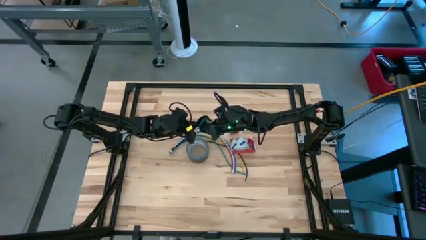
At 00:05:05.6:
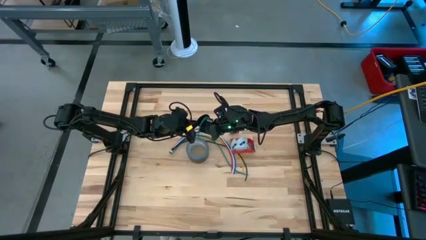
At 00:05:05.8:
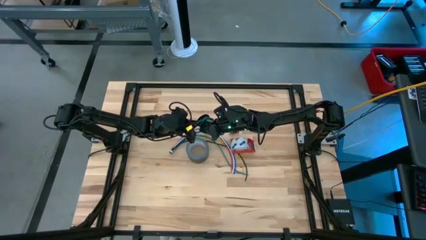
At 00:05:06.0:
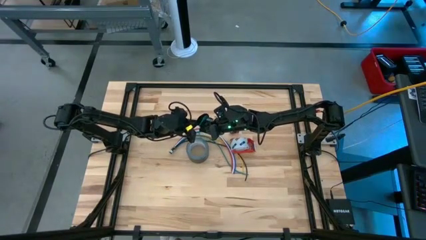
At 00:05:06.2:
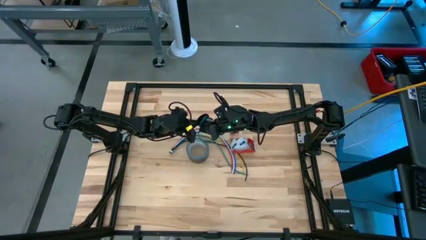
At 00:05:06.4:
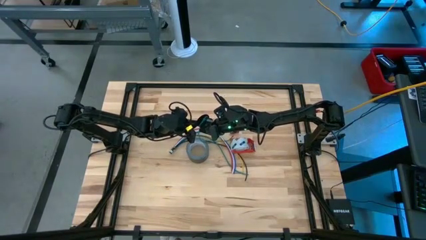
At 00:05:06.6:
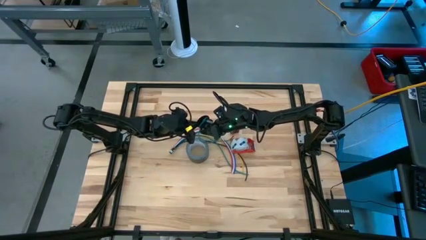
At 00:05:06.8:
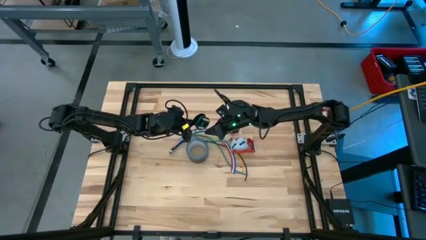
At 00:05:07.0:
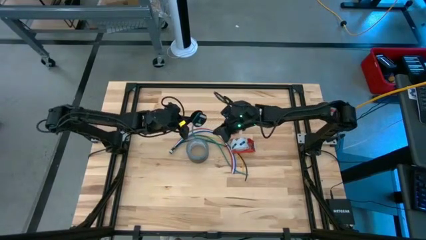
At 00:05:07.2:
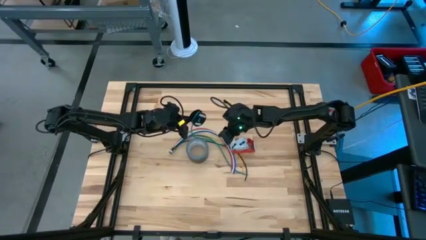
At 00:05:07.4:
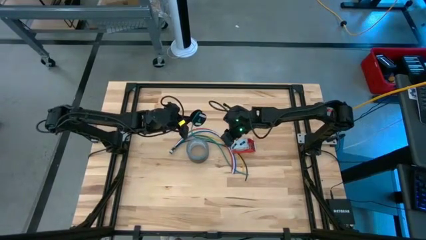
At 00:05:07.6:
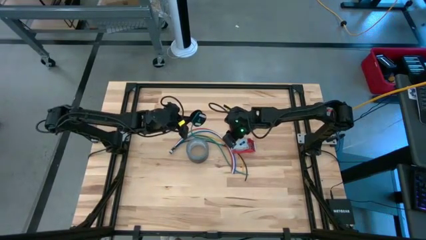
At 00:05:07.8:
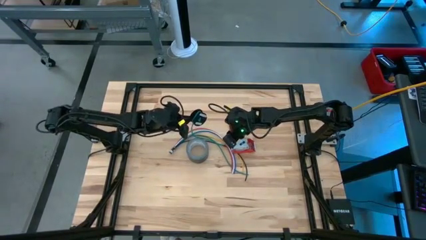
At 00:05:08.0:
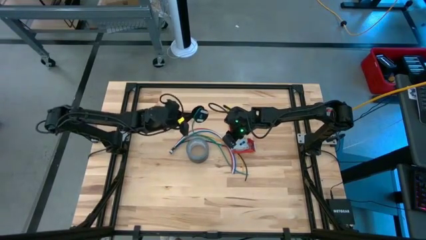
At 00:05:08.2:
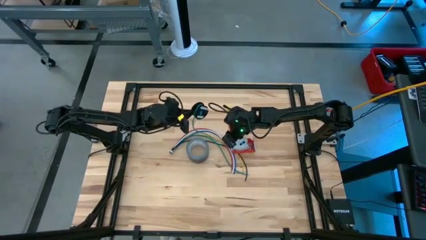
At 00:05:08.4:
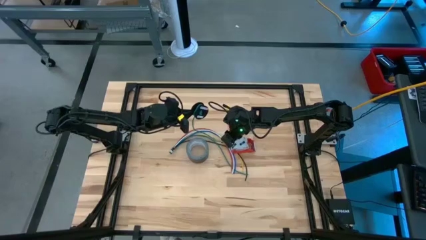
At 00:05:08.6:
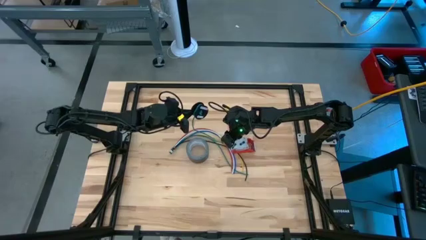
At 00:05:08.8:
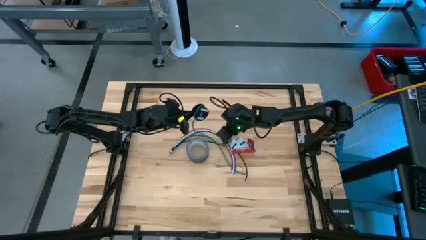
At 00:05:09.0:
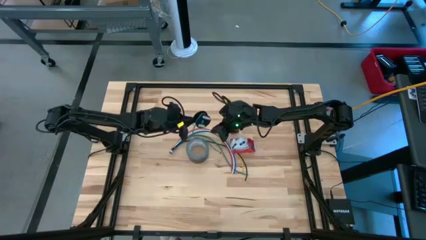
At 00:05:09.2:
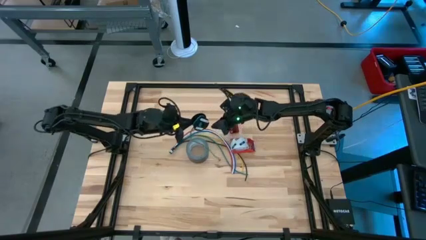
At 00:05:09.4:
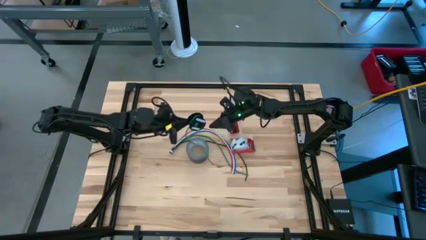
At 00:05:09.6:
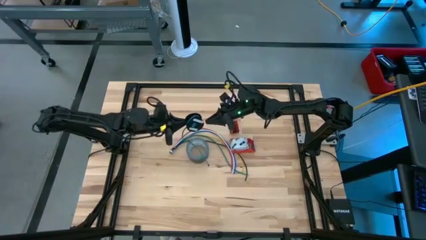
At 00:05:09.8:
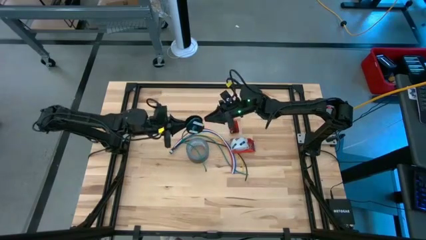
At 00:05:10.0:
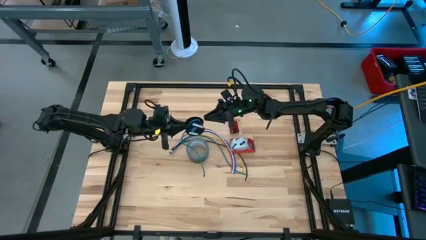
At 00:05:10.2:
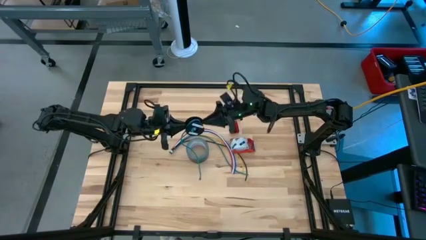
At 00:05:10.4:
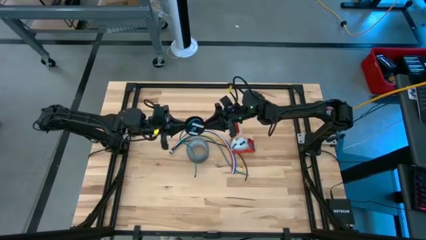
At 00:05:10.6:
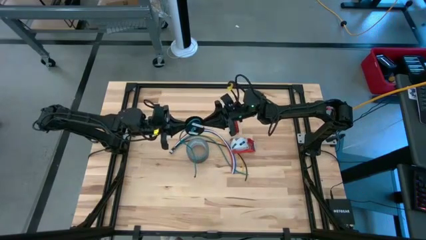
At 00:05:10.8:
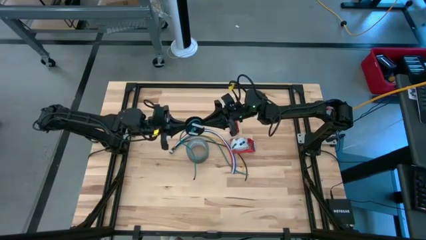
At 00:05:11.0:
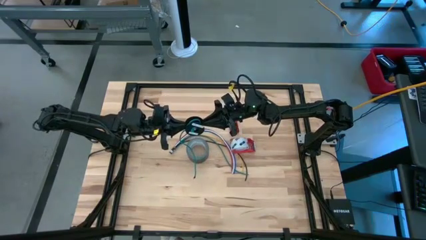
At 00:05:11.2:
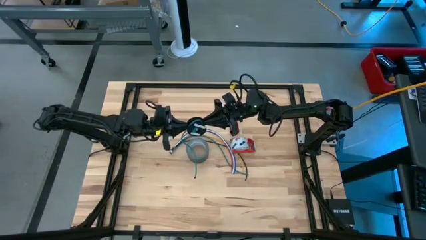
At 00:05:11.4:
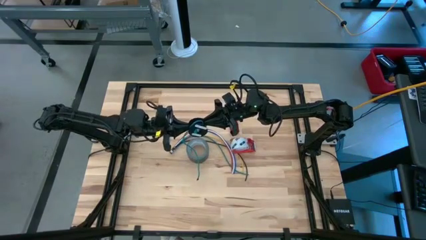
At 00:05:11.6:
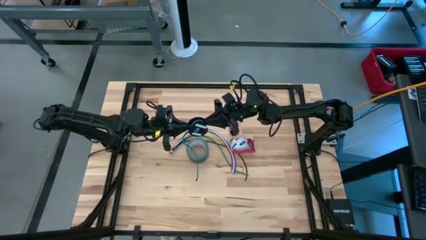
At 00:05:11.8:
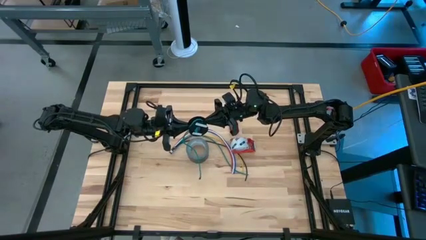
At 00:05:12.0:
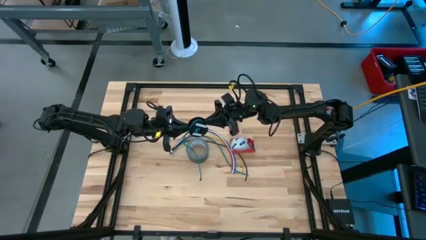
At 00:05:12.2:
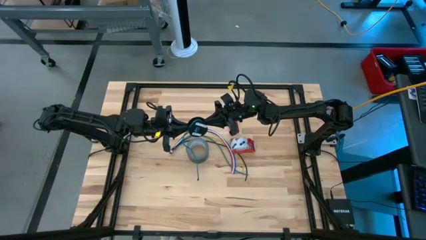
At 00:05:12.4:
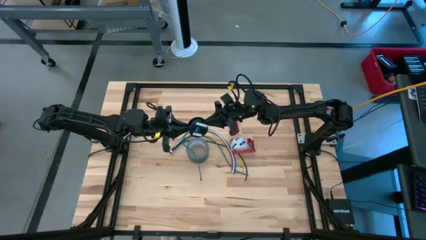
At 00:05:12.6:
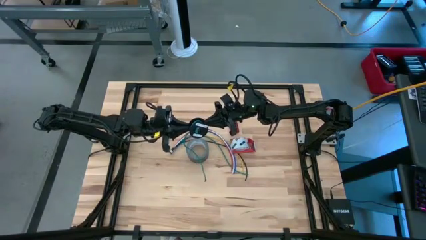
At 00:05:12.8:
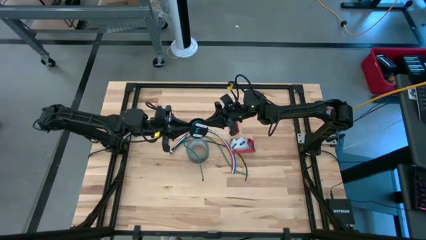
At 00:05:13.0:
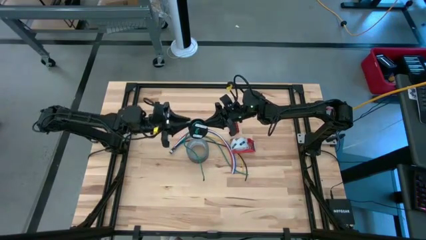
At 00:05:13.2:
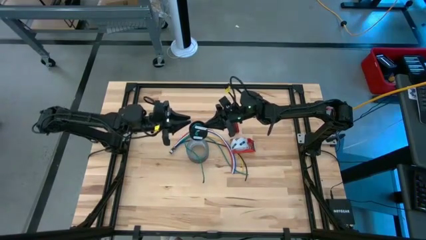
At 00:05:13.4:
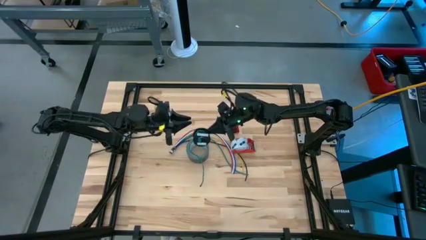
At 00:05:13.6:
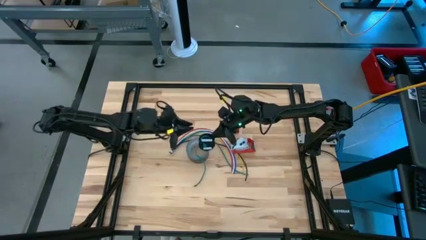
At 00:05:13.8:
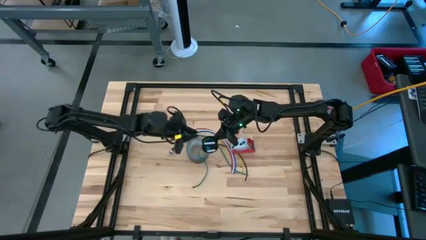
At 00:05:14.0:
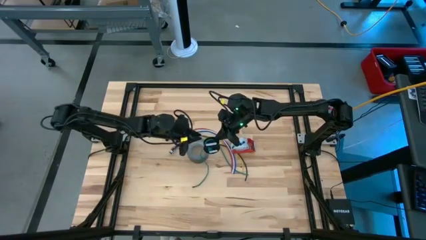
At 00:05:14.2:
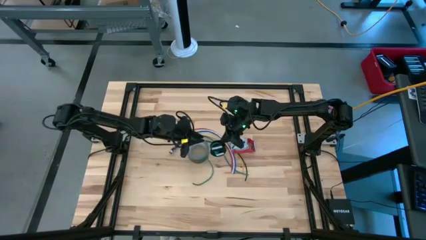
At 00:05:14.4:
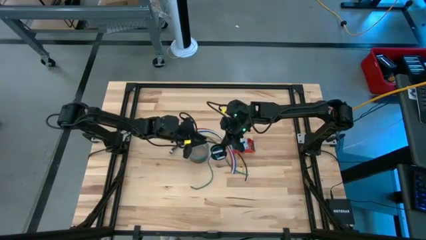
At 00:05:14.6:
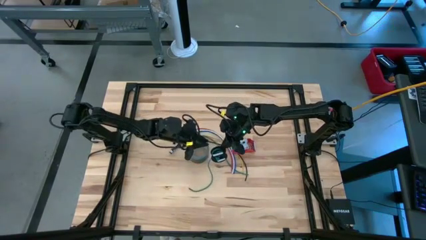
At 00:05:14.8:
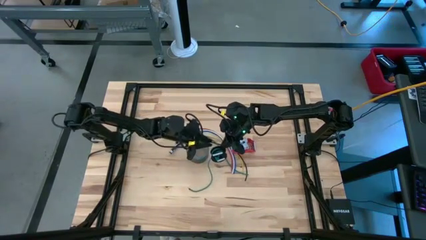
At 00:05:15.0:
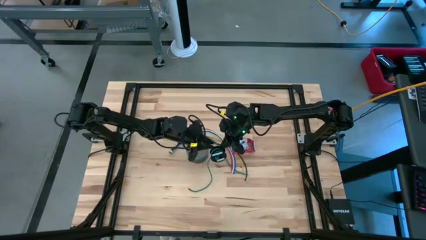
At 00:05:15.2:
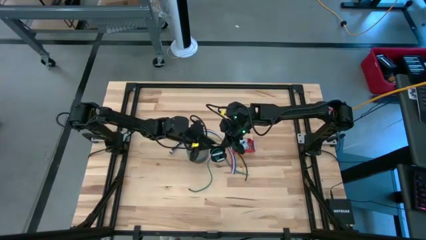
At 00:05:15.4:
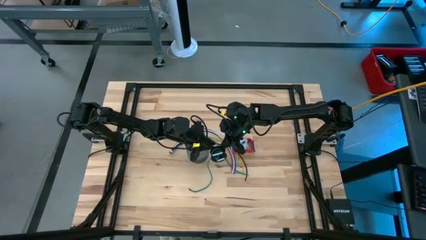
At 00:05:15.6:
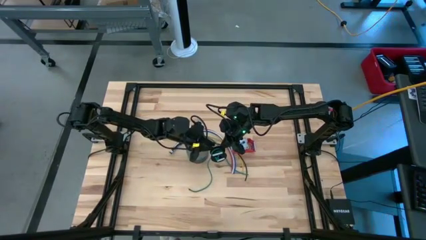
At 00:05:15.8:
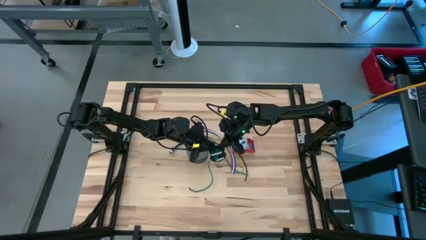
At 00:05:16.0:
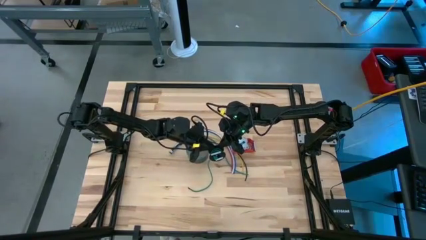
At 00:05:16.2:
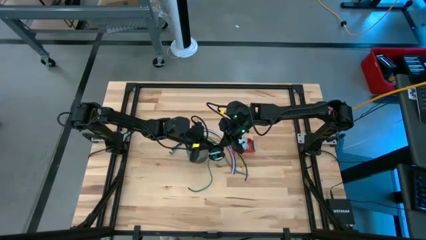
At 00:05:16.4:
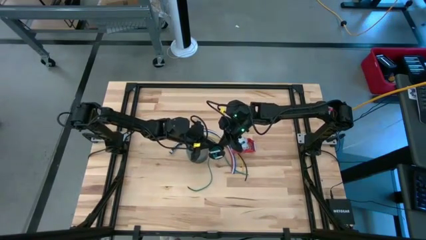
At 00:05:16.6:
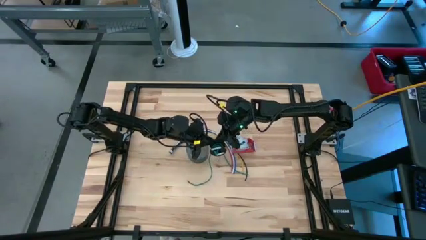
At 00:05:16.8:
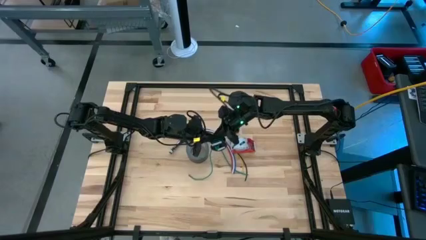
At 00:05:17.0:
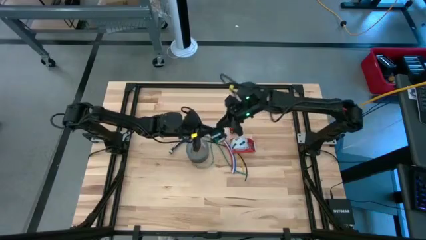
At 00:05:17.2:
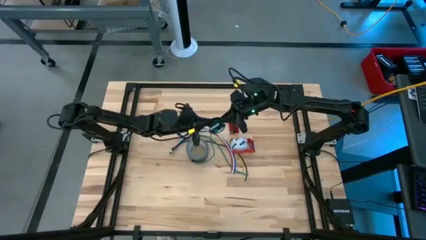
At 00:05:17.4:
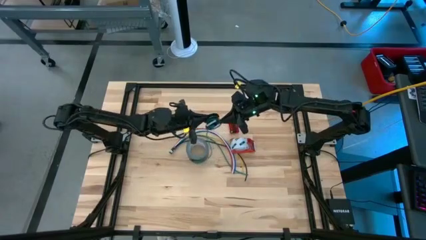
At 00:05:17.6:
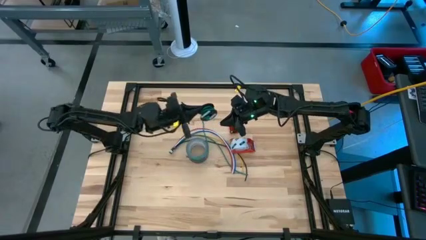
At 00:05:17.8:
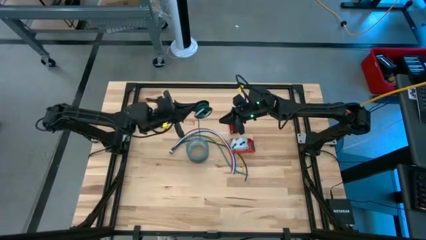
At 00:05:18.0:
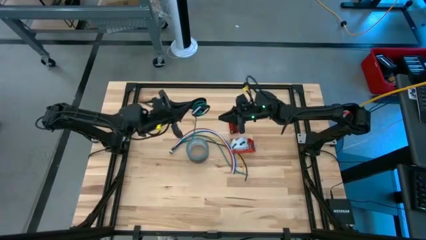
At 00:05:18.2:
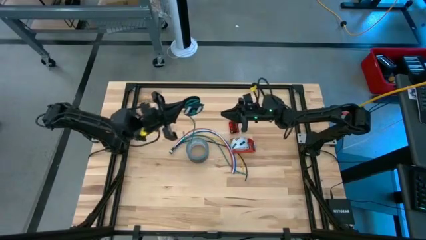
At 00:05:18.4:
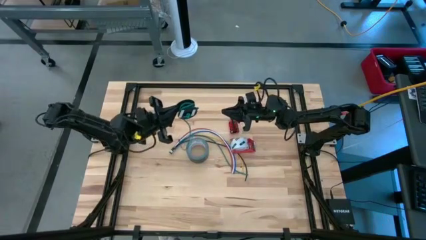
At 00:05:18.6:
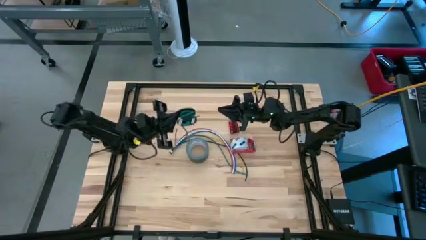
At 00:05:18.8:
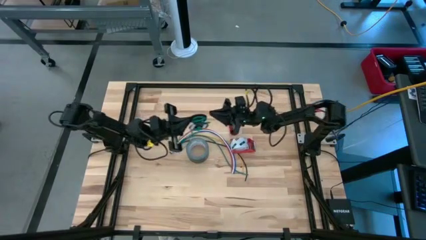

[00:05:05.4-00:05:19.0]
Task: Coil cords
Coil the green wire onto the black spool
